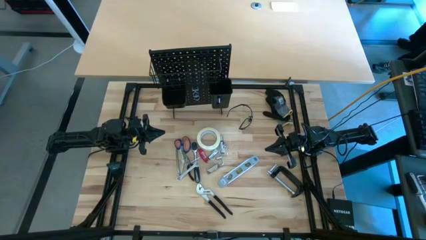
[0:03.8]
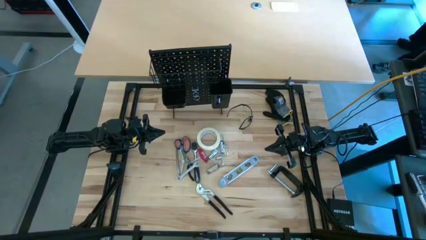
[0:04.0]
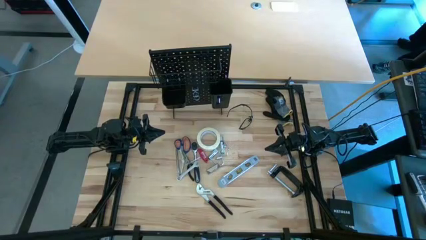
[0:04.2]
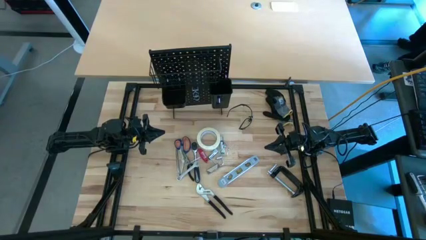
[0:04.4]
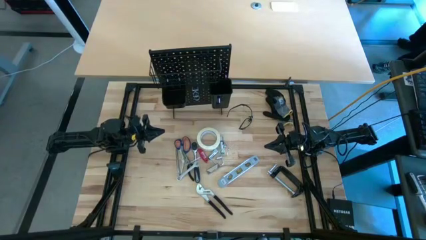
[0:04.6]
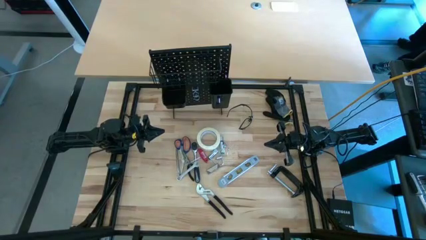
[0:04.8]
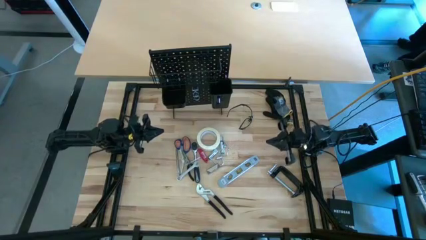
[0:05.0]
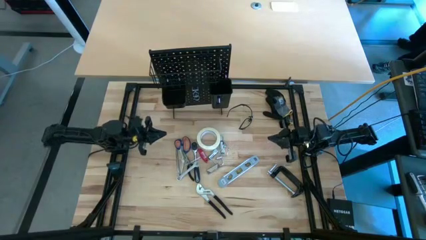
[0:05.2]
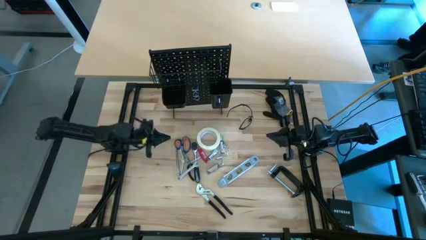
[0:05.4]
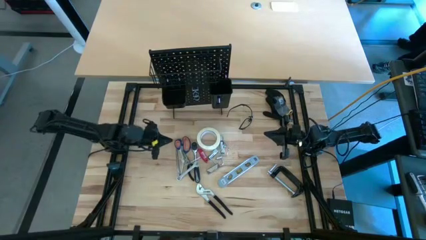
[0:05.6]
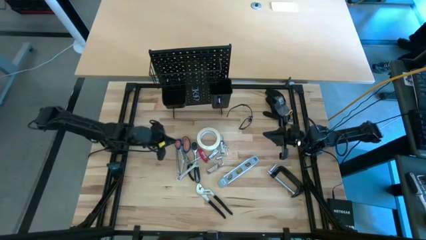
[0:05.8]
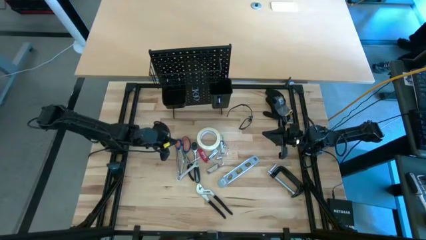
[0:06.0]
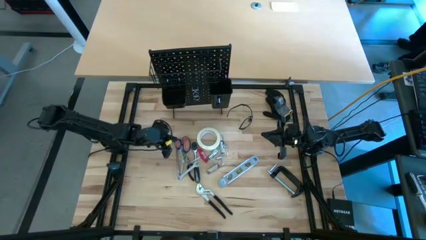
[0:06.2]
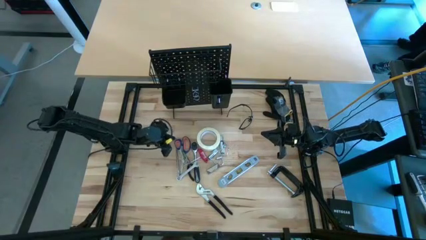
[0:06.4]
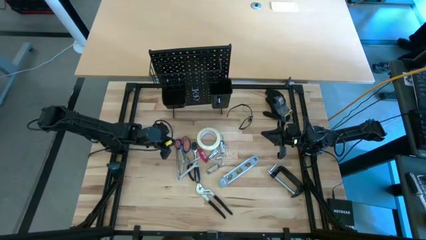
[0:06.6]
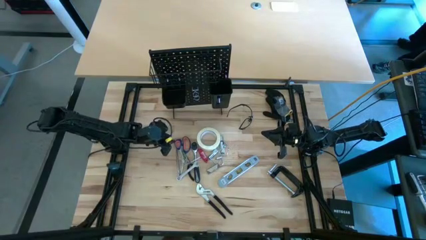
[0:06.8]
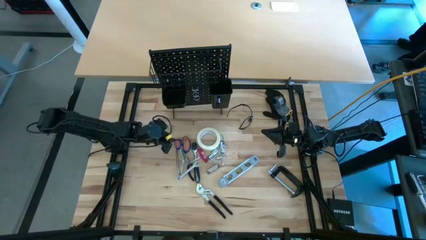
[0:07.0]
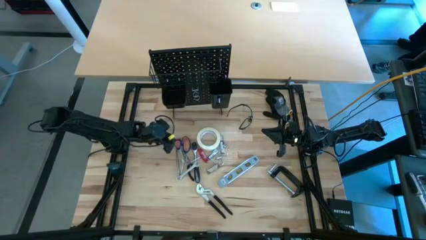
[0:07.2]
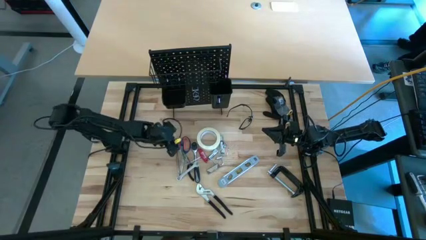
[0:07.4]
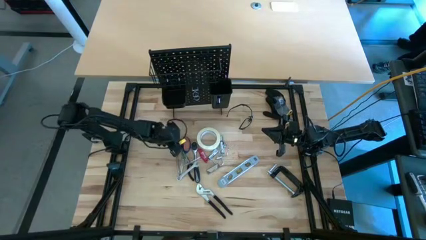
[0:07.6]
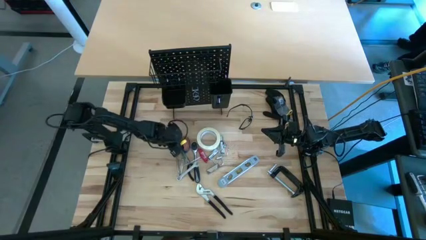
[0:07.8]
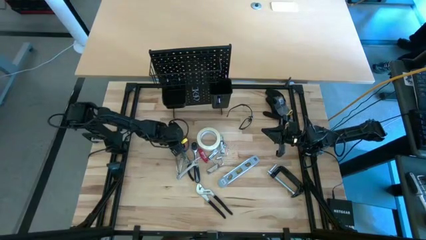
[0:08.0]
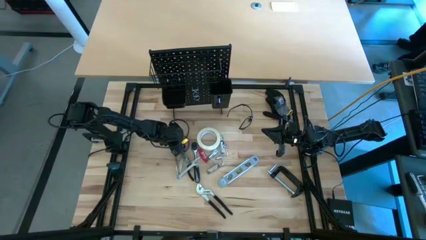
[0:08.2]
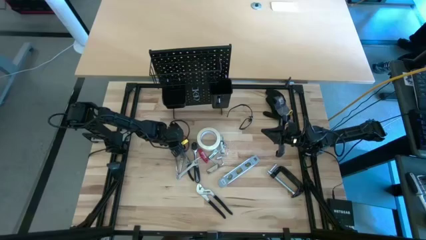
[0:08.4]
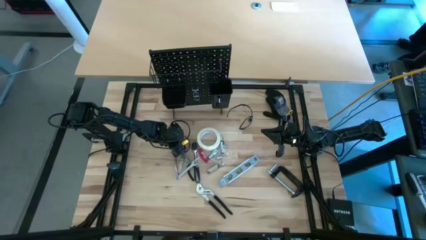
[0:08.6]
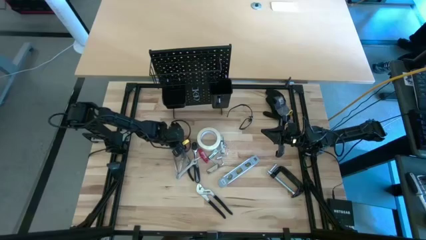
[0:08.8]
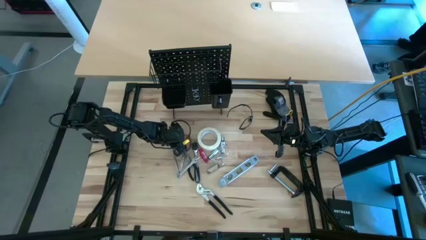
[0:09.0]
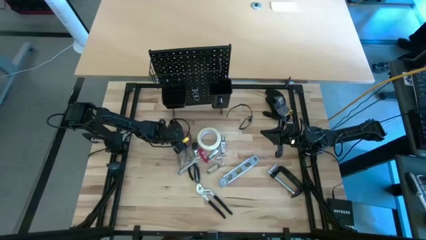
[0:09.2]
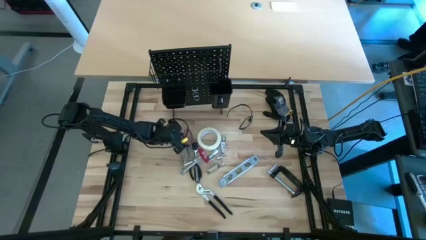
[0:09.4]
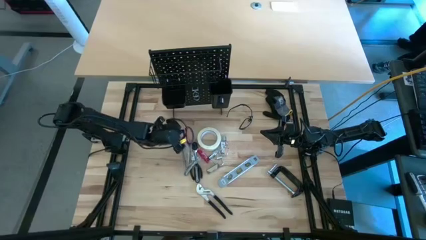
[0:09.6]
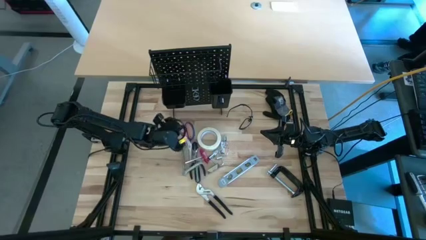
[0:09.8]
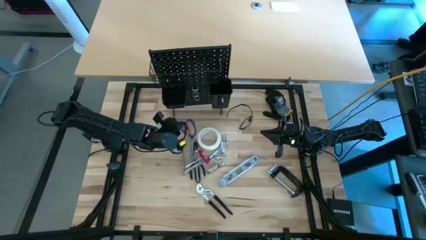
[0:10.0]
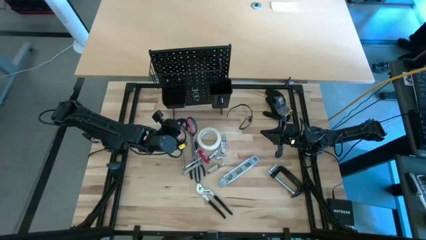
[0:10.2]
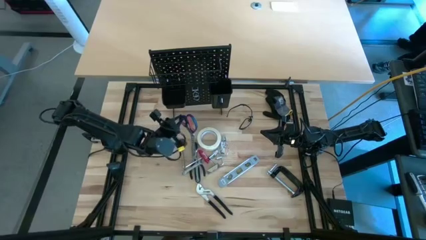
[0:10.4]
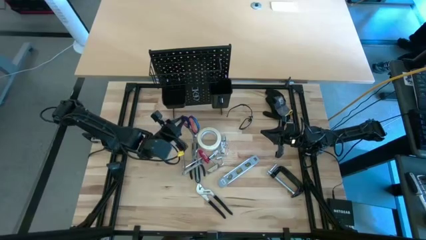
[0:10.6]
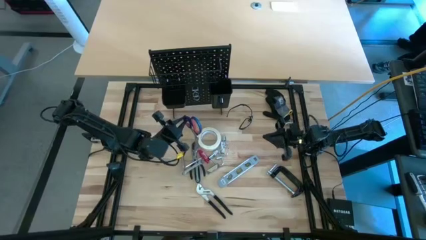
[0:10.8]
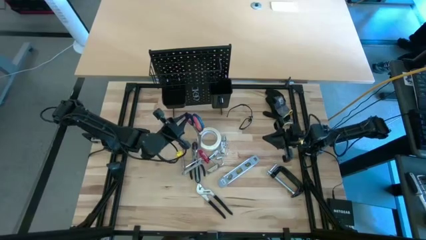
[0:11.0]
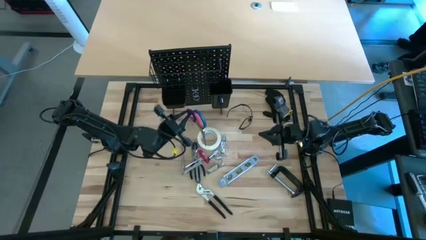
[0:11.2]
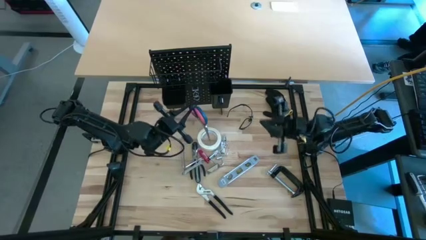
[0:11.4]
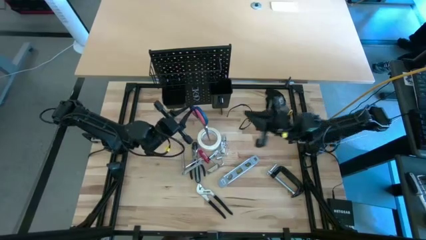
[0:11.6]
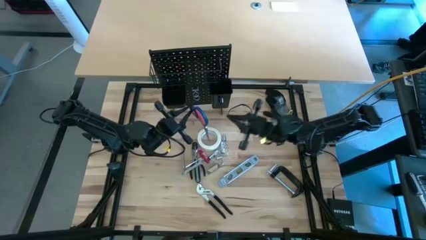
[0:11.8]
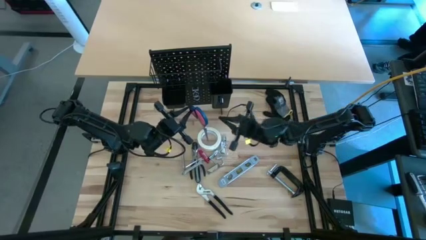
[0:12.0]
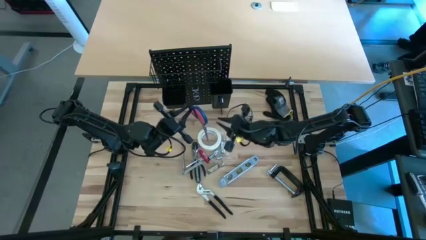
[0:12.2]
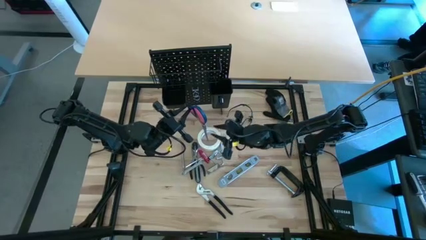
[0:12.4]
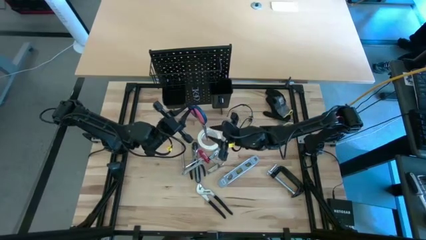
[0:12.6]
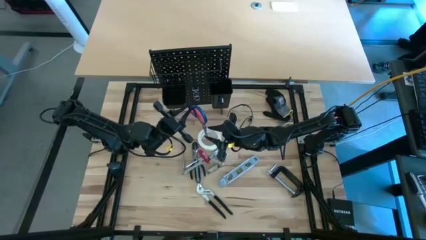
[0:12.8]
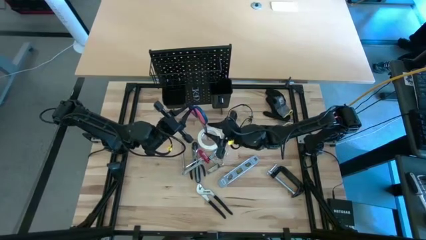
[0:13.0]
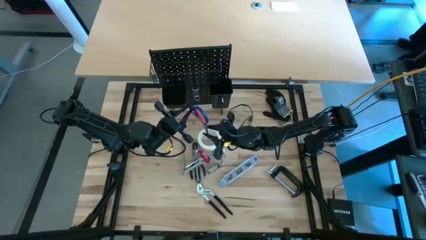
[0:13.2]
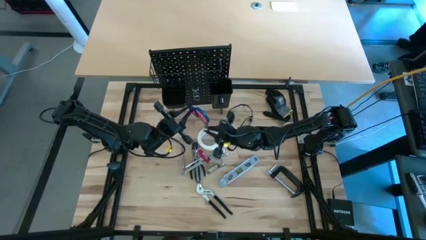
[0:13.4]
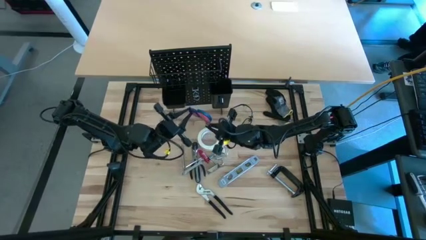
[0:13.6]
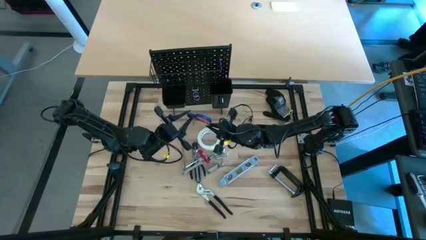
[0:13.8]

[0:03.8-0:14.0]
Task: Hang tools onto peg board
Hang the blue scissors on the peg board

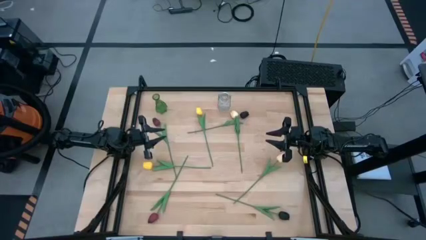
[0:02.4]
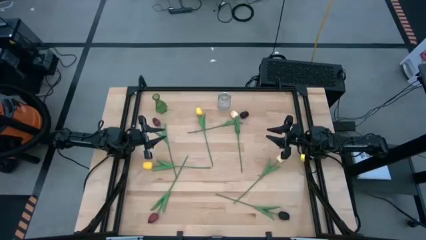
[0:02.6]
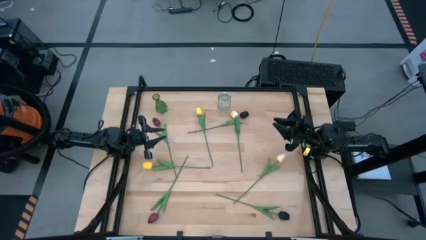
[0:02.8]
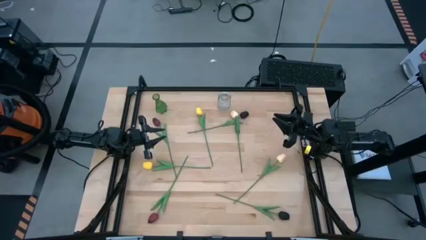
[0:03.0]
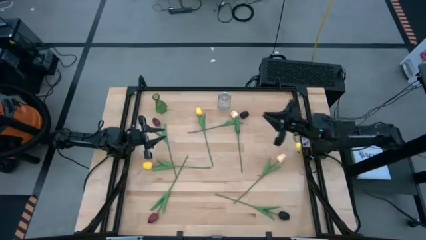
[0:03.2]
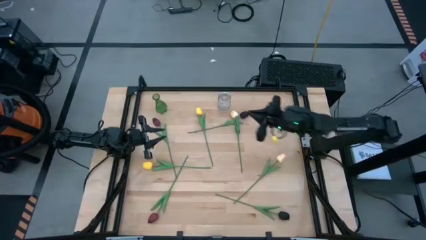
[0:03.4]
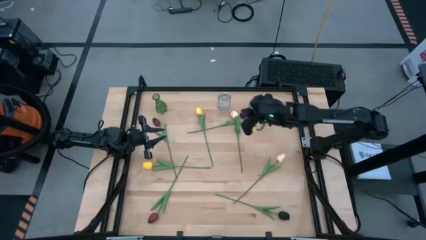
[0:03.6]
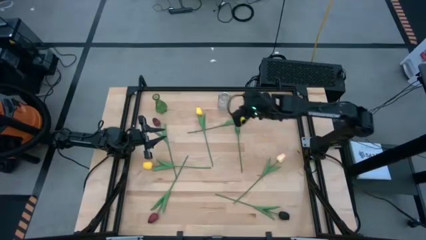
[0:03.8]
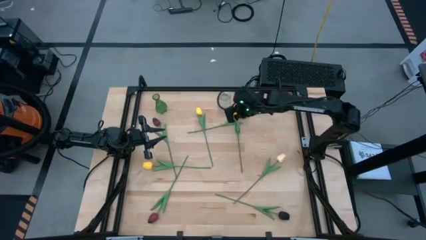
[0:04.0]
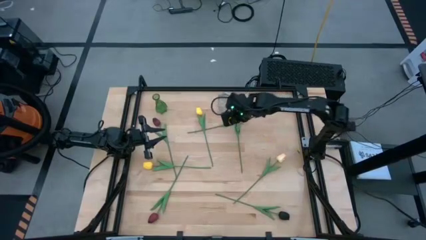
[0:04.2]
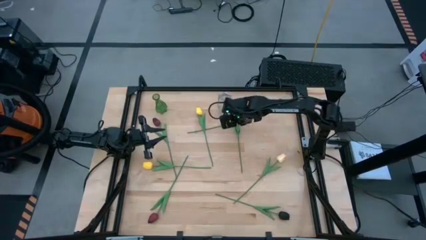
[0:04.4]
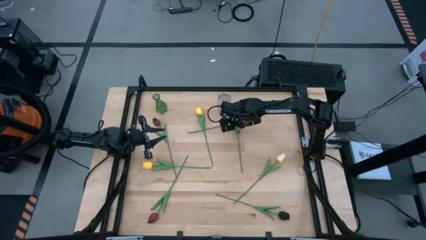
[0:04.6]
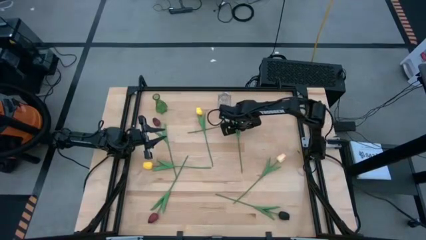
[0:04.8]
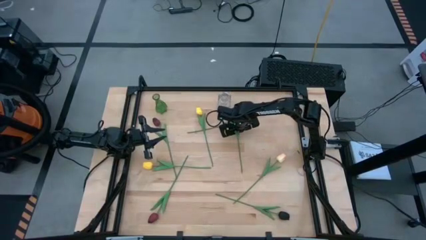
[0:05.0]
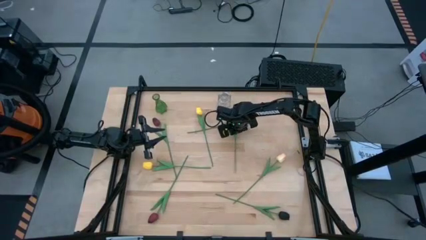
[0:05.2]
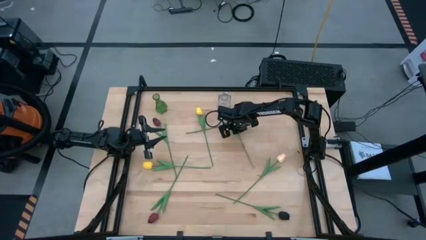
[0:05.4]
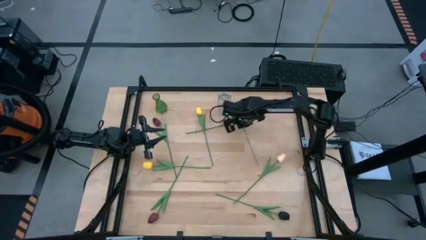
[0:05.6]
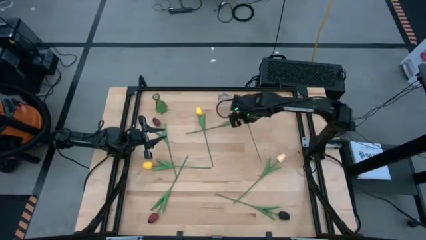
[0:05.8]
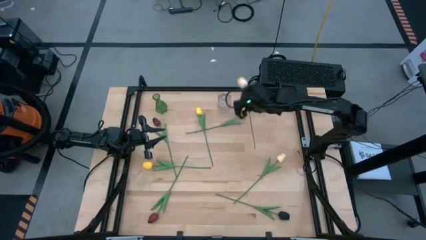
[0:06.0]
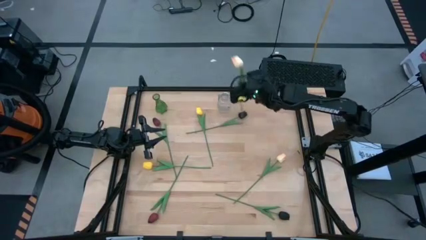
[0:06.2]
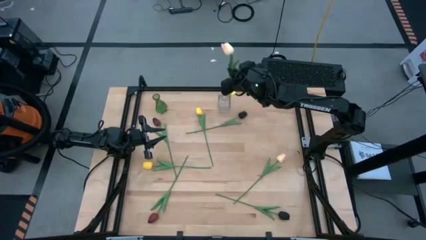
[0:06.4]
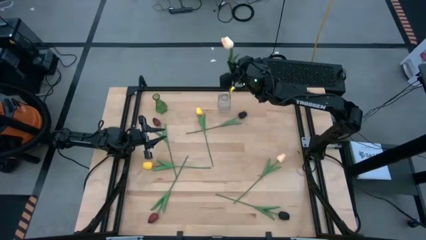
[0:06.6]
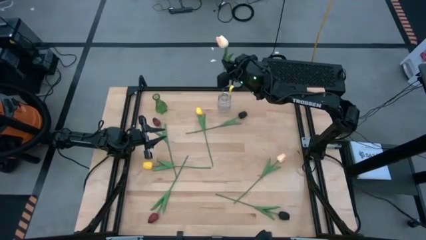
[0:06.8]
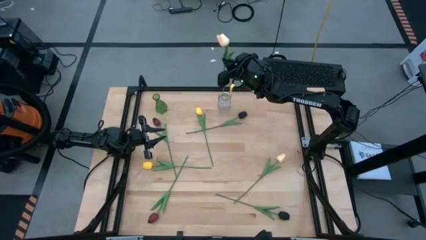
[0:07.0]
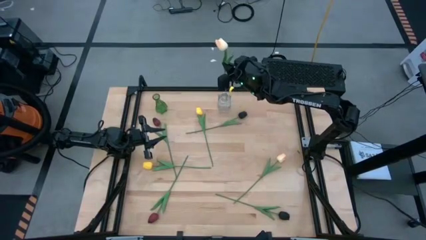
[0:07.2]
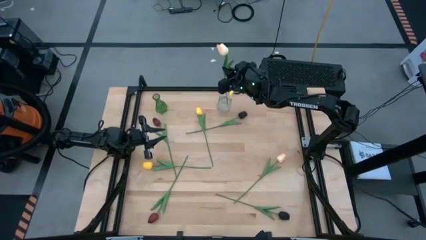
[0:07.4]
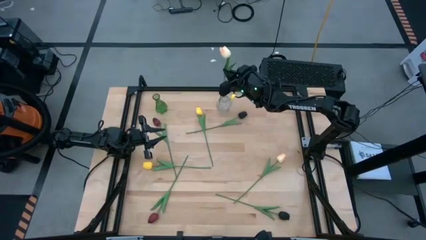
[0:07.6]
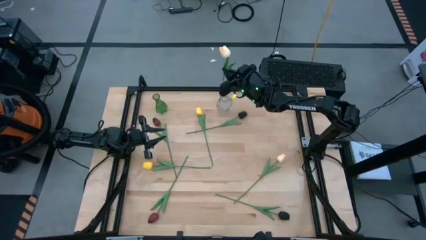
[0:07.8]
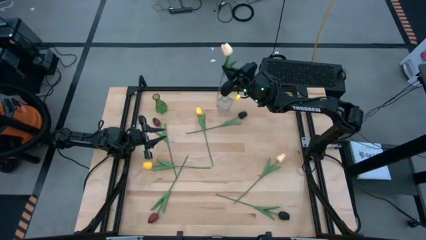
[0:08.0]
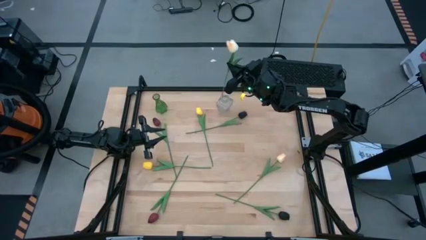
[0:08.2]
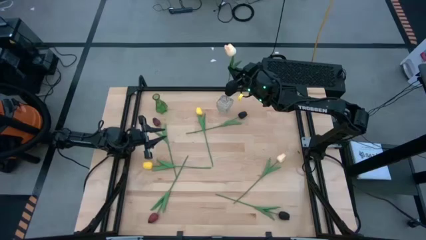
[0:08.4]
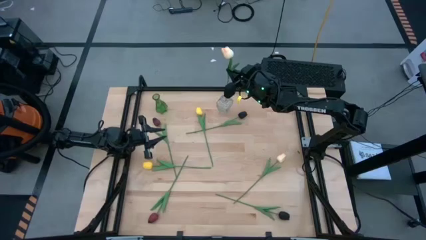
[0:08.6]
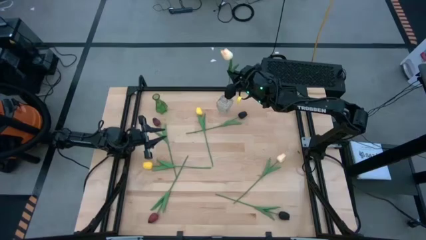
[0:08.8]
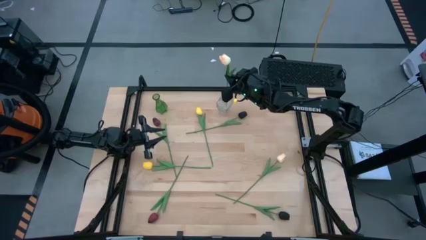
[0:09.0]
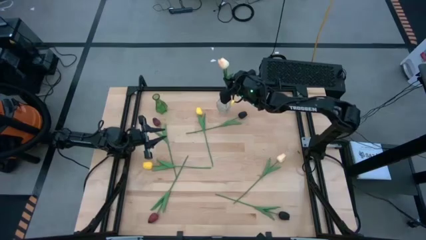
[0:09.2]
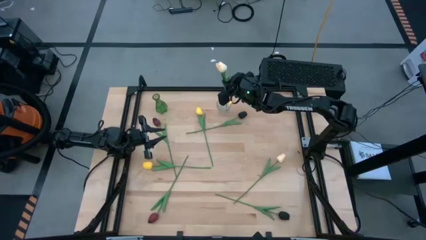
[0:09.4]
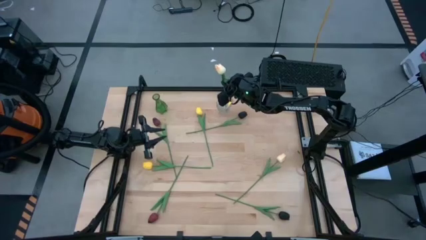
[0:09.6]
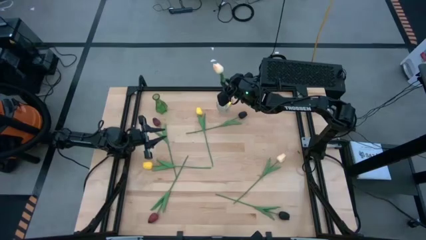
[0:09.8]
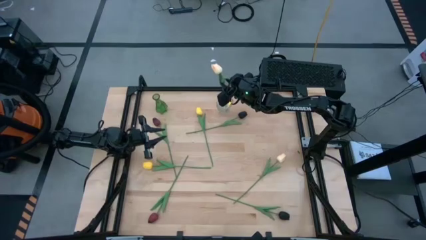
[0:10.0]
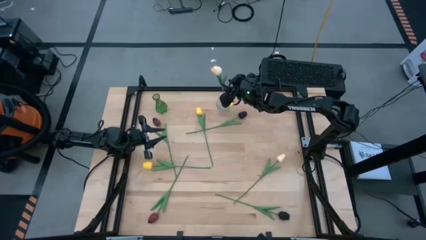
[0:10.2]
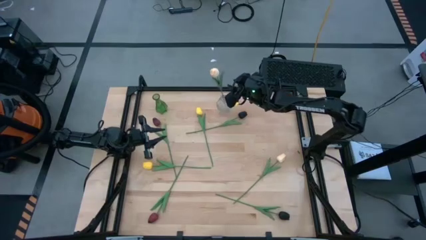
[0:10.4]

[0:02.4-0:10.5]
Task: Sort flowers into vase by color
Put the top light pink tulip into the transparent vase
